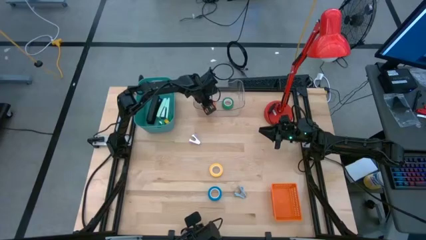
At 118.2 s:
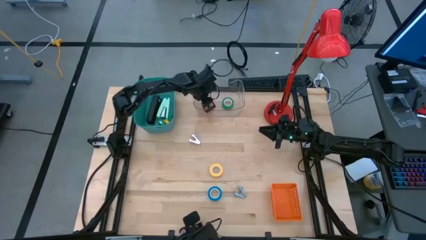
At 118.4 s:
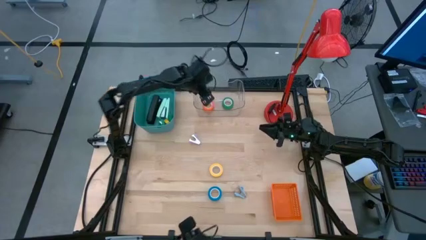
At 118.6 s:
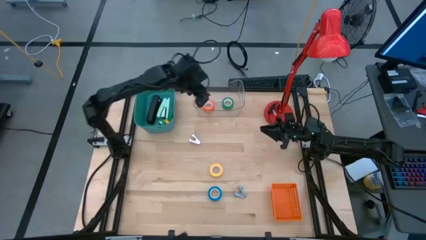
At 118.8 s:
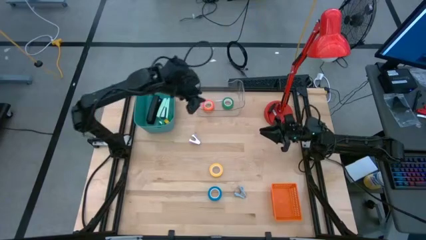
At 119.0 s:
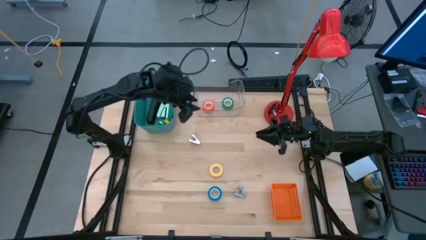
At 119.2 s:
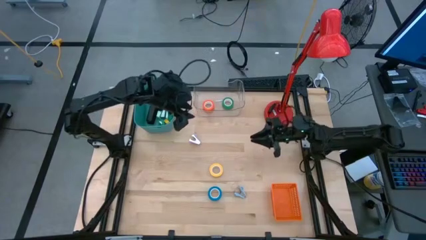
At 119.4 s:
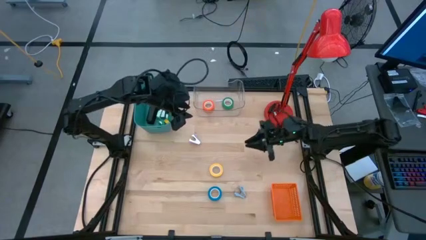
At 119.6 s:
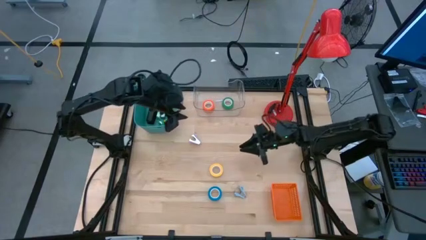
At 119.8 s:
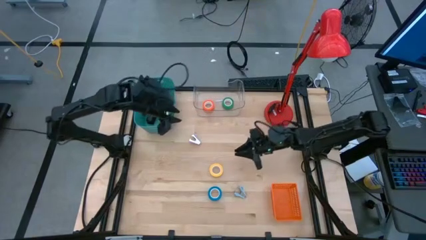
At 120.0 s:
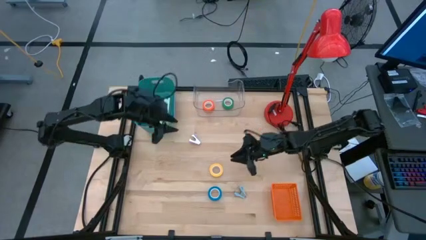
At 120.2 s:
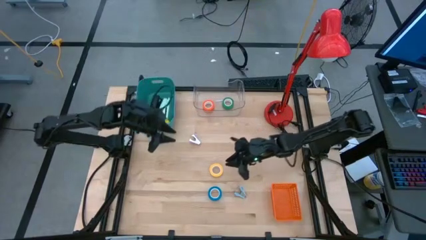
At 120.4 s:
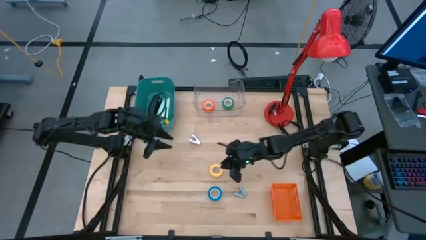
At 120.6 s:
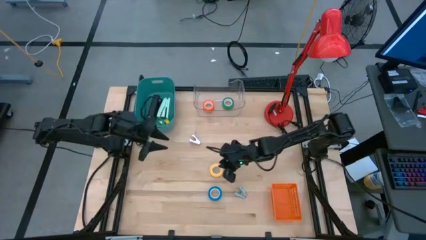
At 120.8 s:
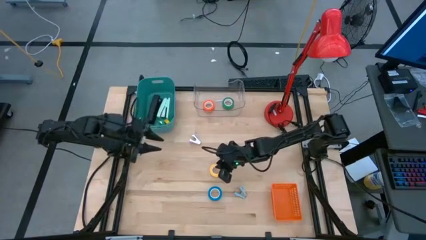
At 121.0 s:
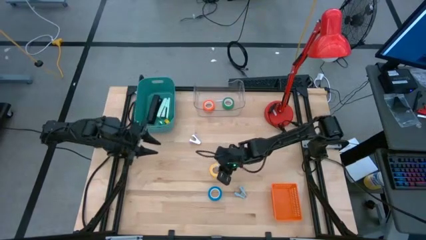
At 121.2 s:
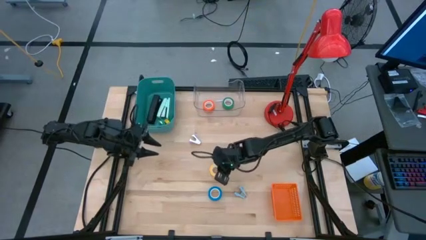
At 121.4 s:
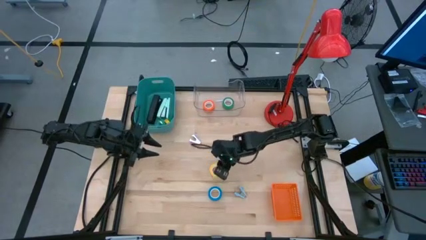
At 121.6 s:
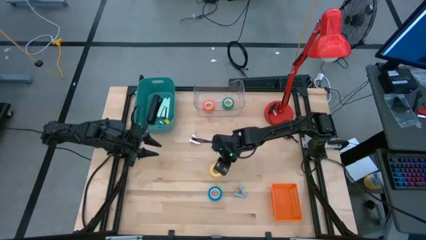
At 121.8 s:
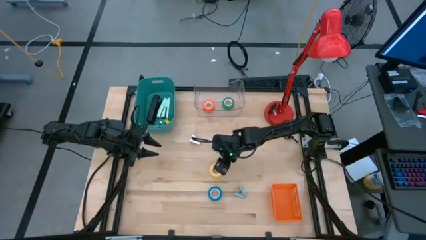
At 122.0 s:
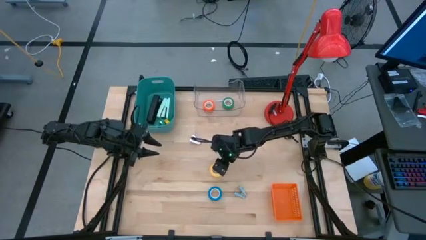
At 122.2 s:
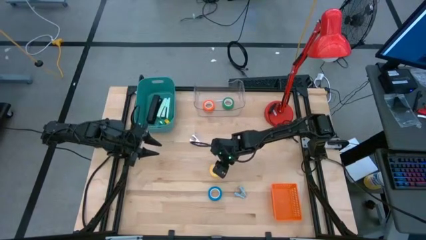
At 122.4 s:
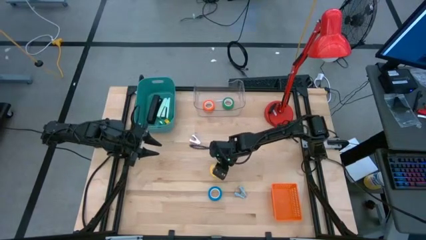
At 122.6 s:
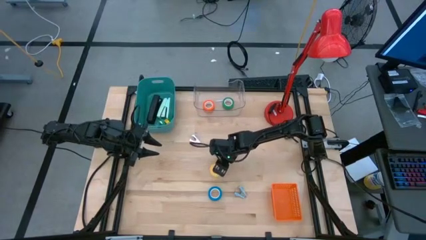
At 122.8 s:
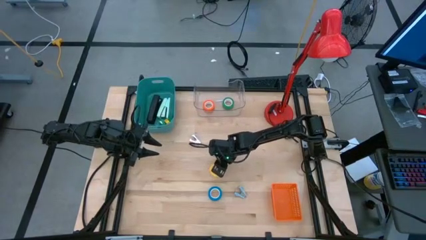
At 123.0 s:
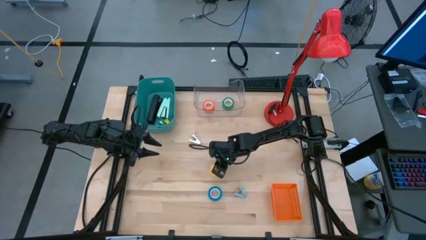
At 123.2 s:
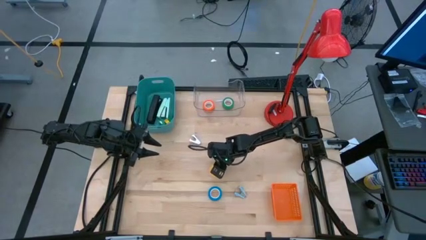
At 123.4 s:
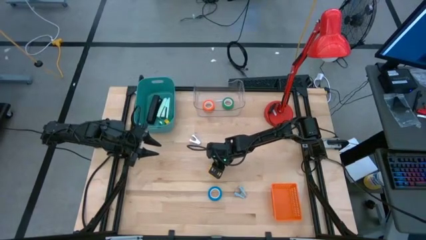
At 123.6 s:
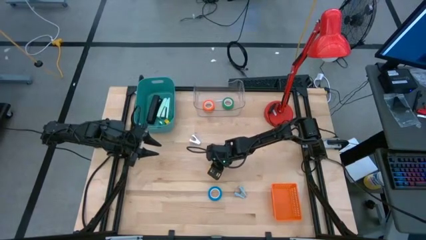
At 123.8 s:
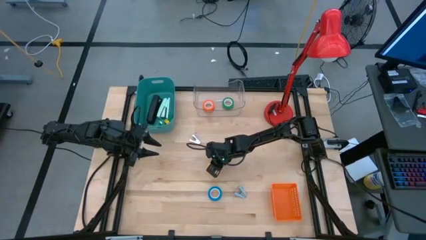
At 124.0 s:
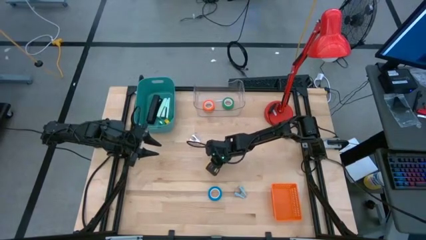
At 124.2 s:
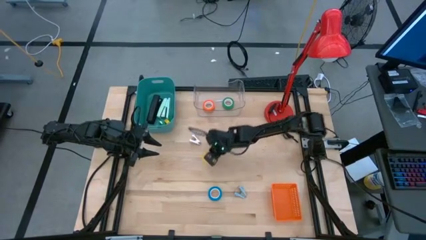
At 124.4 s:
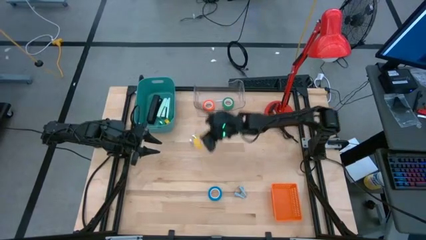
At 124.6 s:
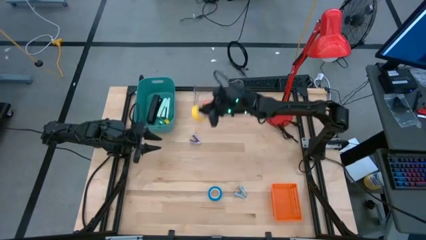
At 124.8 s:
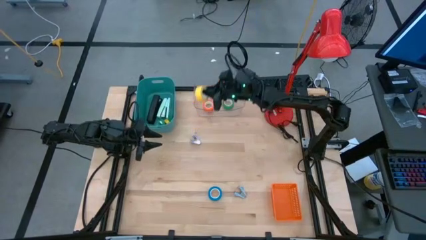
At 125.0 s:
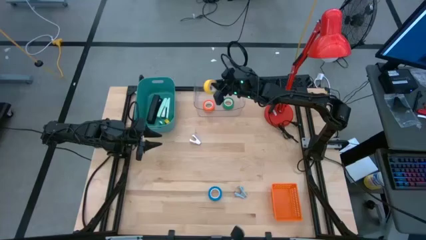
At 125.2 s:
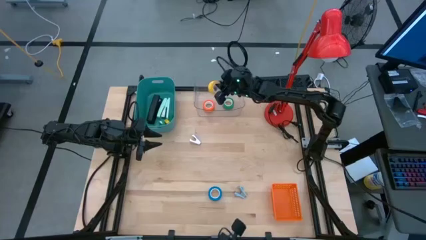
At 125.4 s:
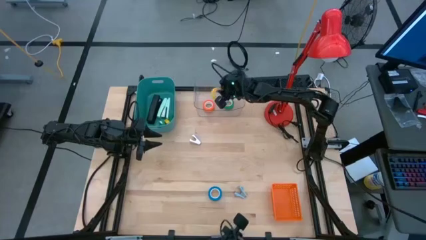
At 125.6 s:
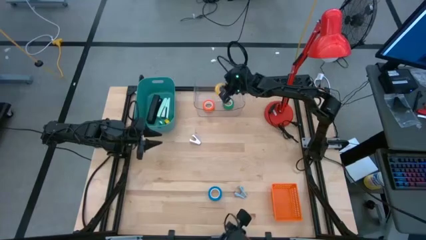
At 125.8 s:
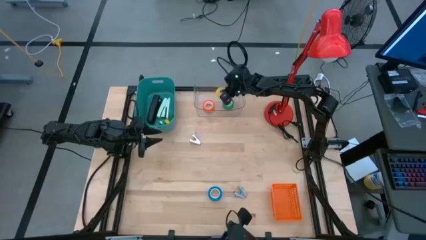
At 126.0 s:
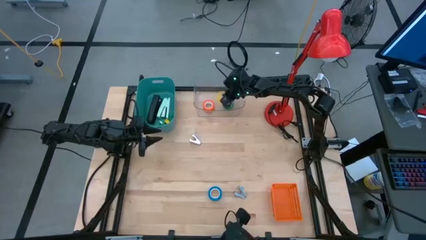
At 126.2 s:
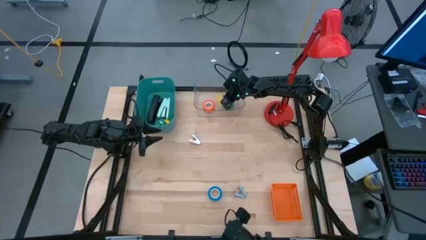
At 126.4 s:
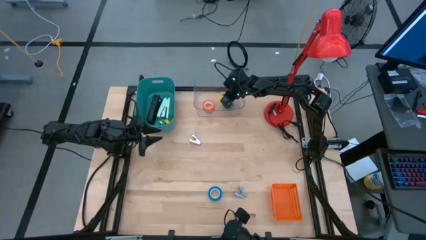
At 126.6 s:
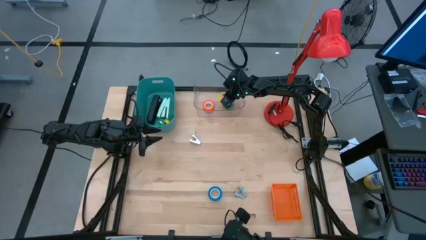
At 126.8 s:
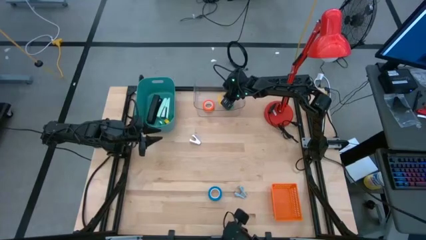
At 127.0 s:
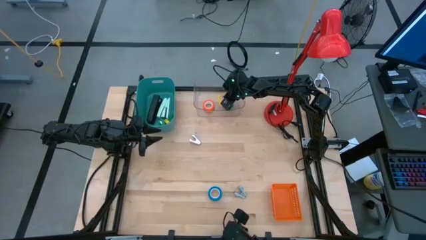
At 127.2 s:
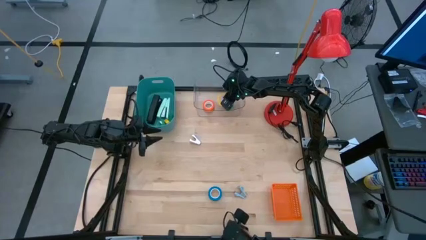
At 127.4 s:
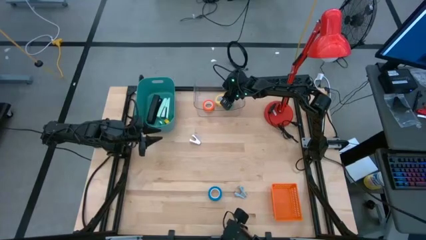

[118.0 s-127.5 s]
Task: Pick and place Stapler, Stapler remover, tape
Put the yellow tape into the transparent bin

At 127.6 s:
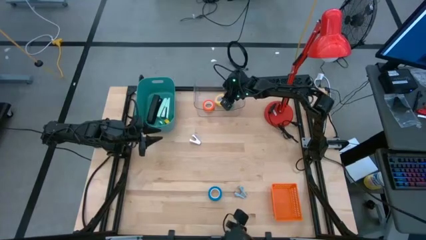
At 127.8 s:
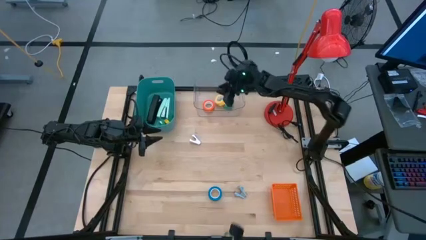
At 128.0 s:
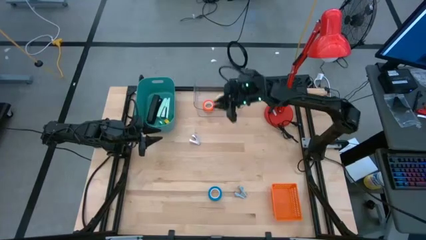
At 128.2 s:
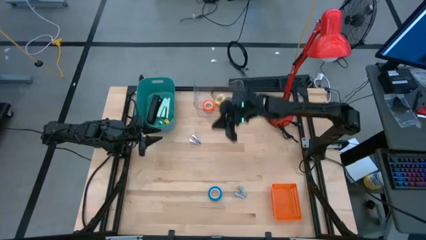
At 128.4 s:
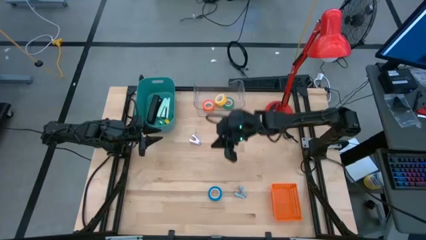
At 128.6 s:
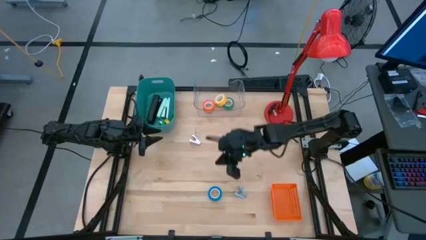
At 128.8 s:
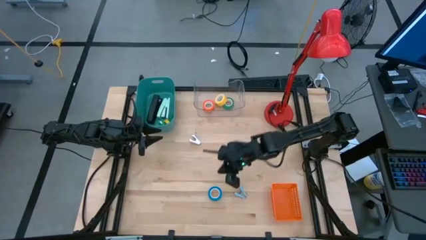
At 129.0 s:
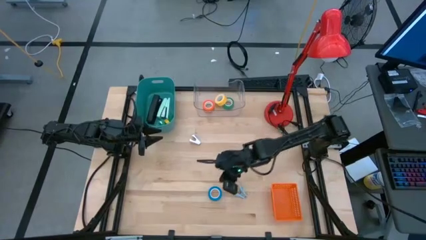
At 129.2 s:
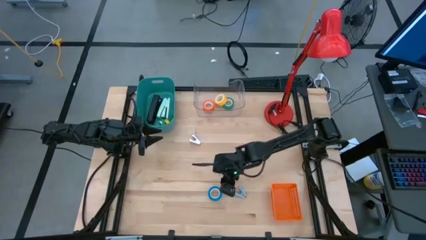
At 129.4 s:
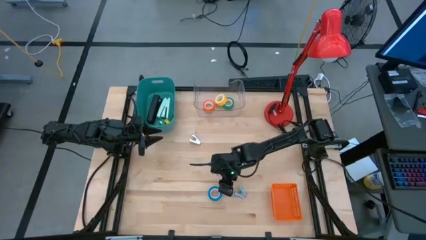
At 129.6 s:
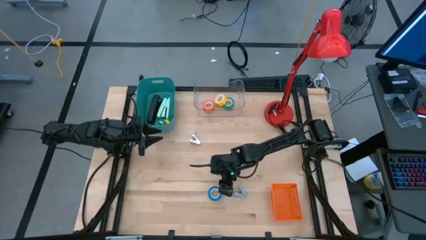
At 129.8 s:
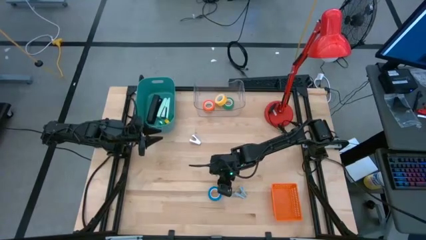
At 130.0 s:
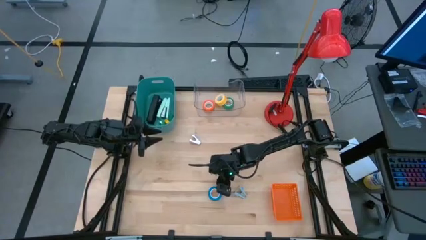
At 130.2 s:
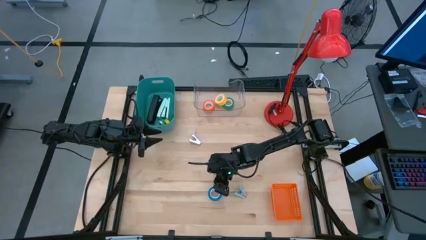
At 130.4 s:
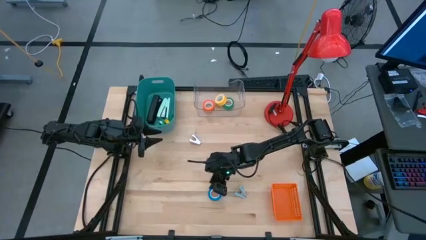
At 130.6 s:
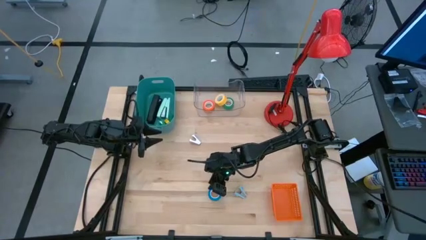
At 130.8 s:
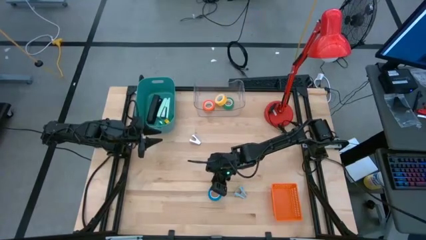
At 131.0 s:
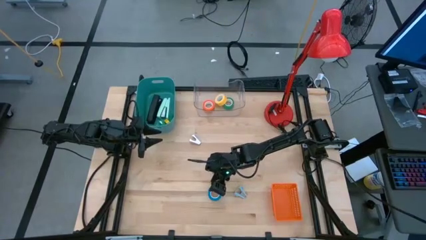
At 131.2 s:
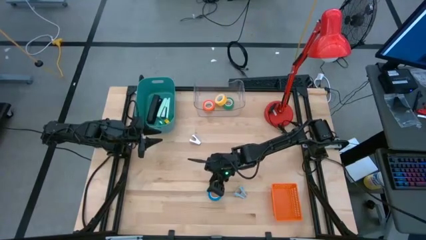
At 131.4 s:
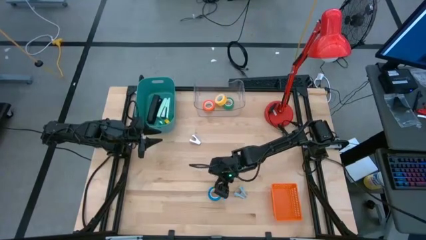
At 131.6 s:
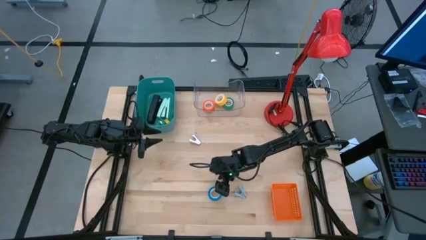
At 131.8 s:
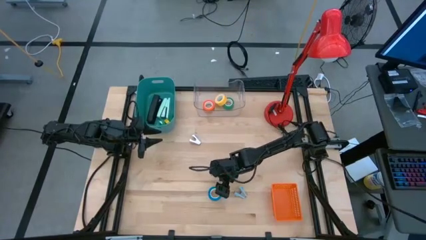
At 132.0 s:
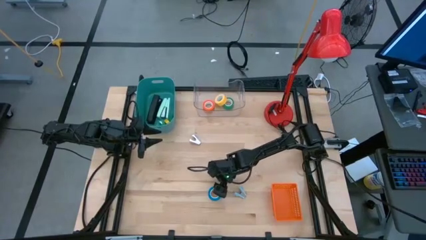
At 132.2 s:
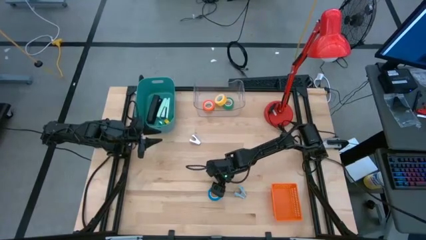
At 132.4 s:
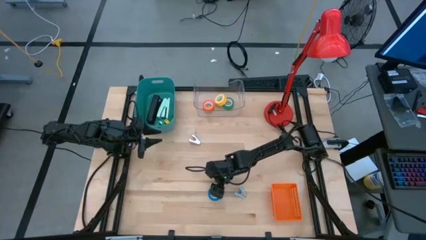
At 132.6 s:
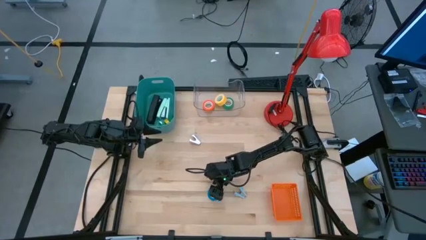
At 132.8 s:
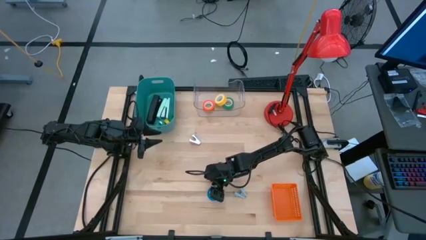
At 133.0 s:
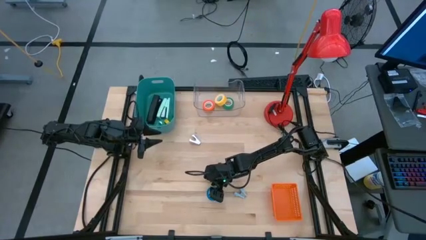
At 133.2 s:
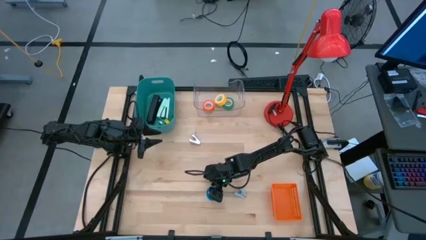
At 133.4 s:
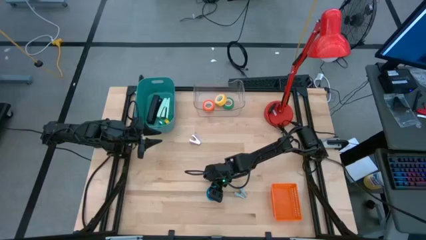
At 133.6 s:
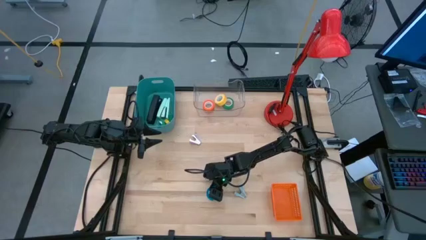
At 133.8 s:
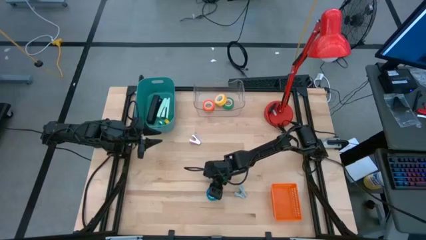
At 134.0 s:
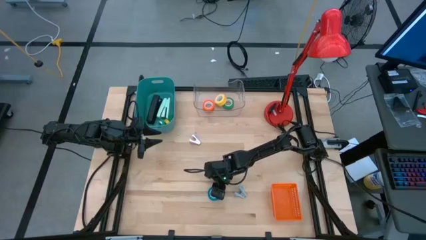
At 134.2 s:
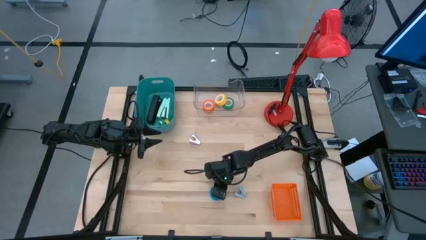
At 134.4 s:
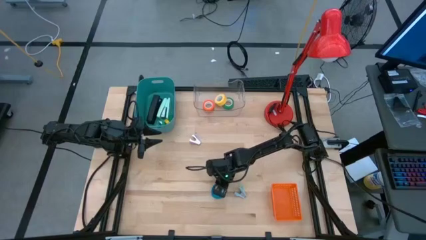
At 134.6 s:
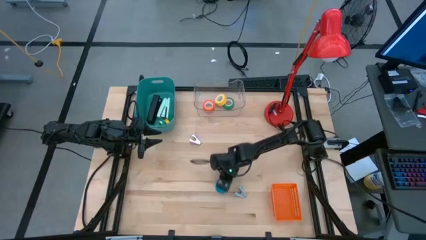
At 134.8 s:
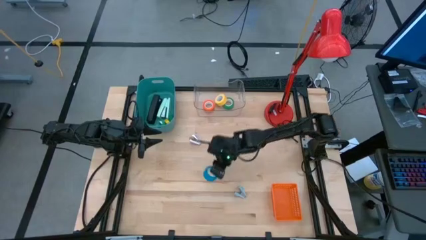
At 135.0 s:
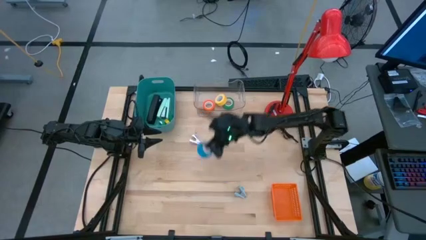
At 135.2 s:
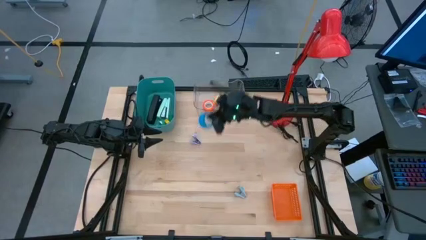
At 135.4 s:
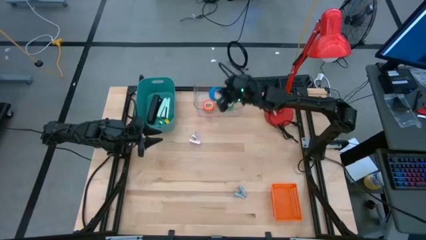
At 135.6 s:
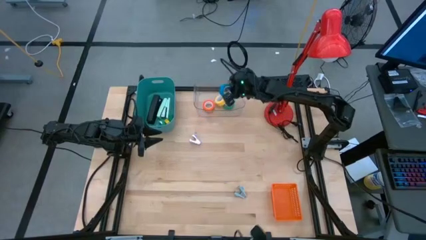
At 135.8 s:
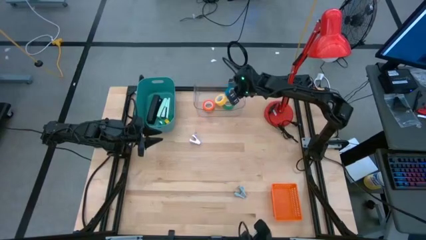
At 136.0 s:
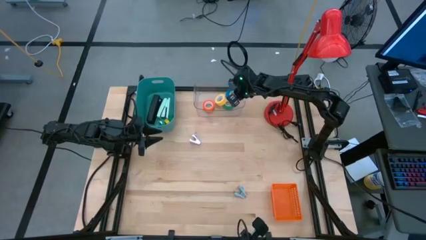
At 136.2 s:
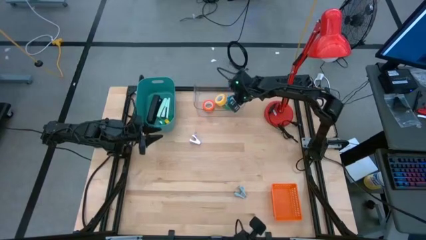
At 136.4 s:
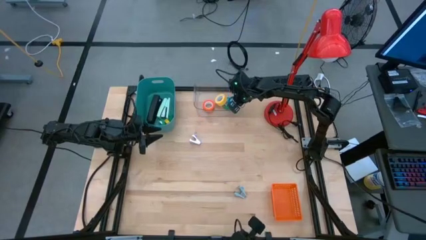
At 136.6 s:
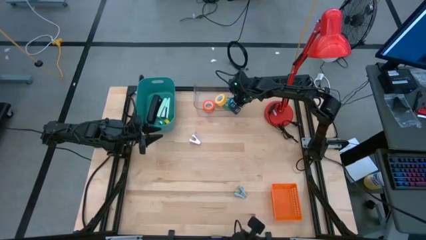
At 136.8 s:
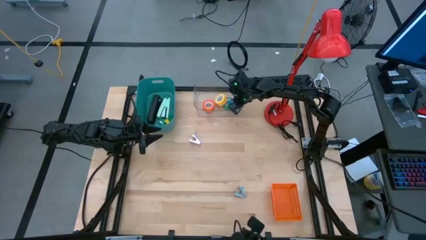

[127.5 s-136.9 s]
Put the blue tape into the transparent bin
